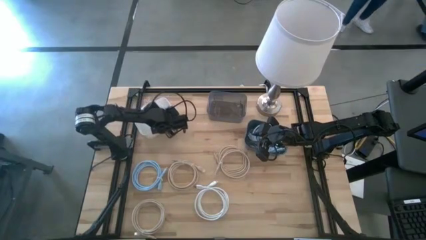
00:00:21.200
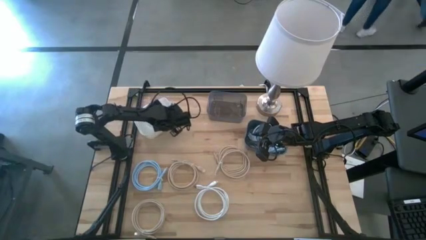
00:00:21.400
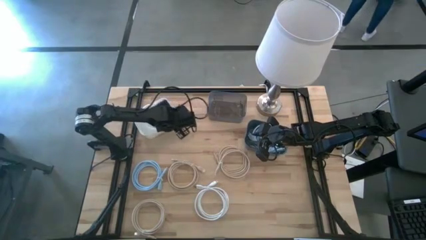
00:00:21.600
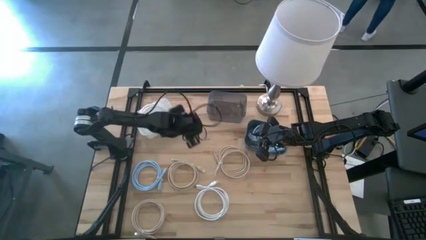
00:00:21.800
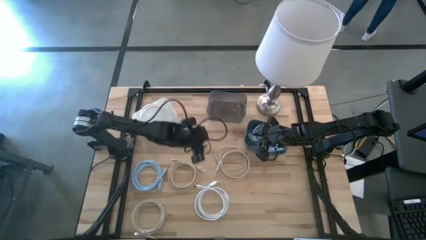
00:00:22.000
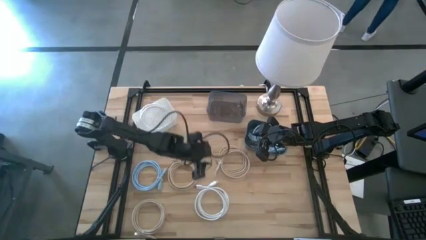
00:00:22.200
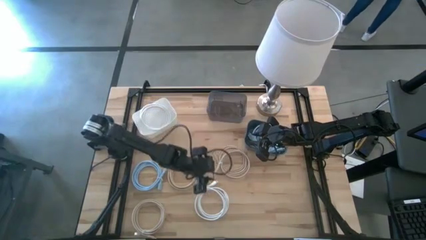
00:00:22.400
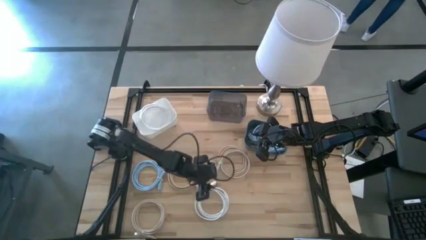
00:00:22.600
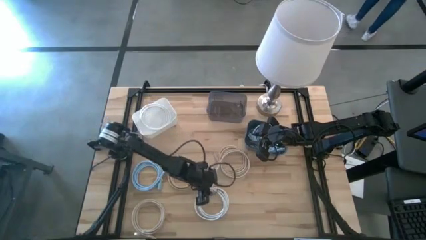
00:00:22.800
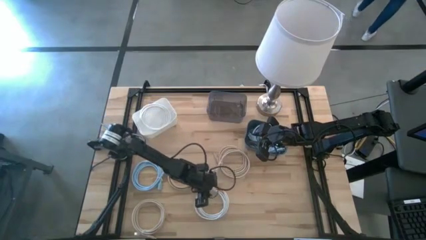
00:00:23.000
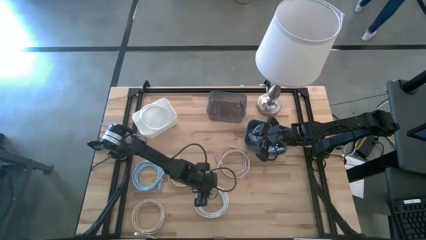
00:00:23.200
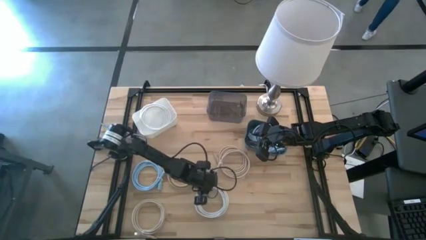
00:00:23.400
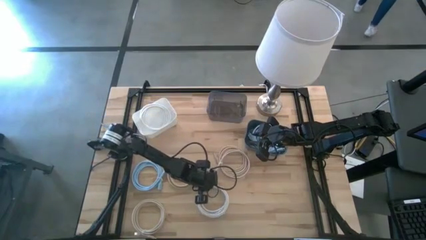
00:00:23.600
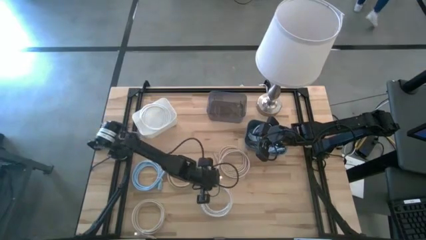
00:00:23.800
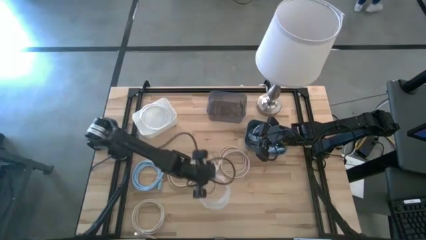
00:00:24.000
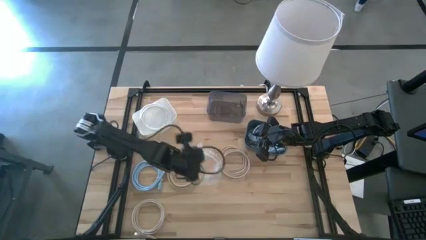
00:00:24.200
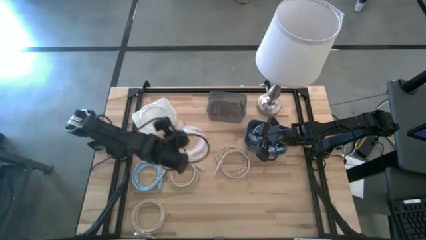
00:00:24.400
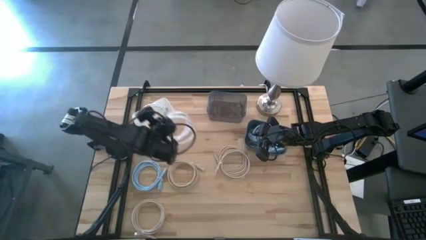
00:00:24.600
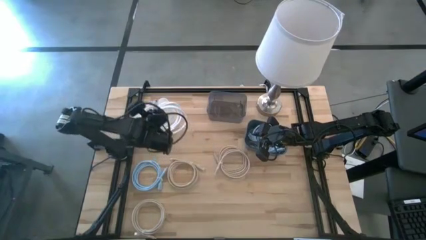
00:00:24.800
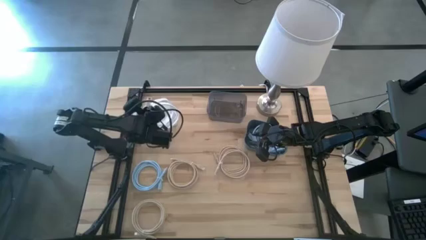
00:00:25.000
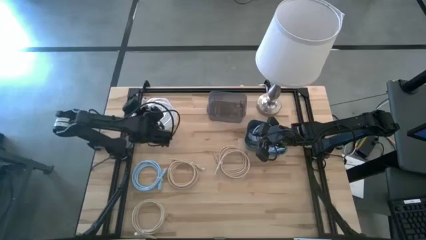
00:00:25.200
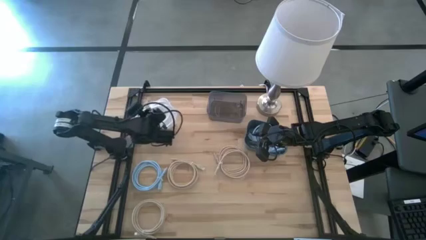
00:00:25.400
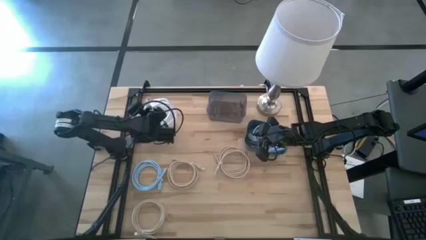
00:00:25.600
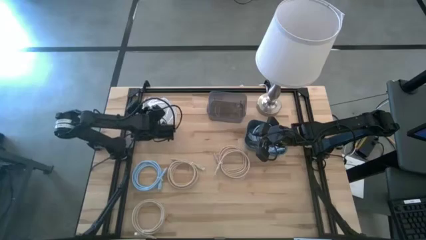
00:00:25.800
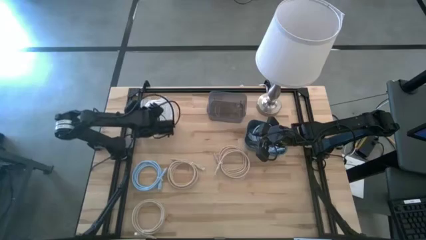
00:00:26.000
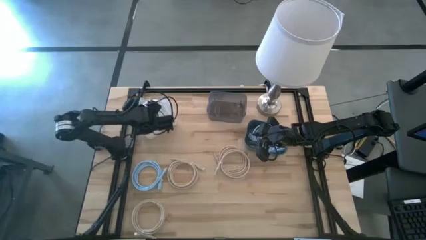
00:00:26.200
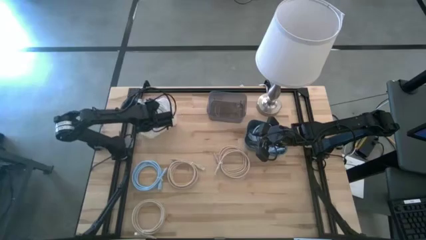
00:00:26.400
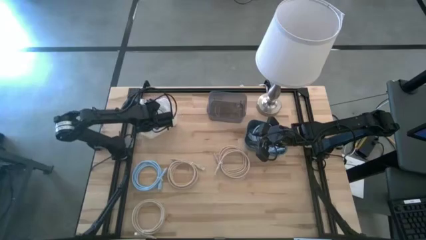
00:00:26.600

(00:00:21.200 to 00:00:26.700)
Task: Pick & Place USB Port
Put the white charger cable into the white bin

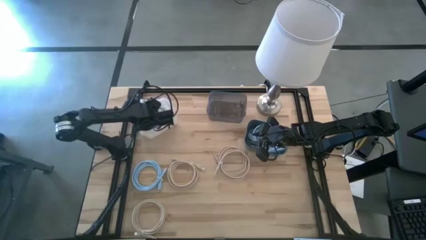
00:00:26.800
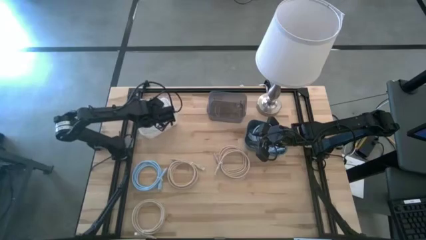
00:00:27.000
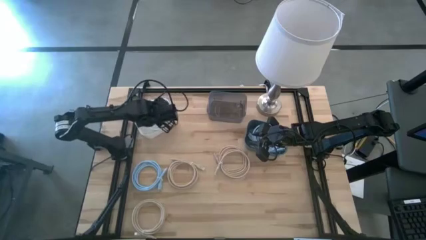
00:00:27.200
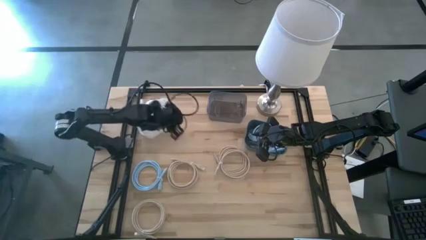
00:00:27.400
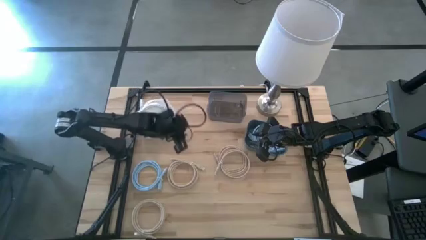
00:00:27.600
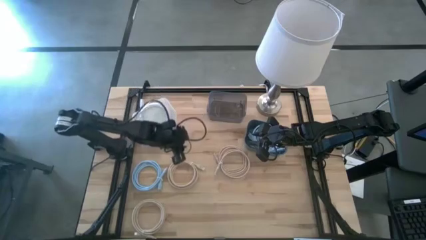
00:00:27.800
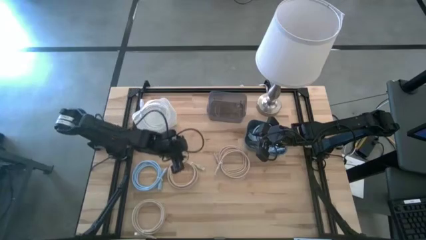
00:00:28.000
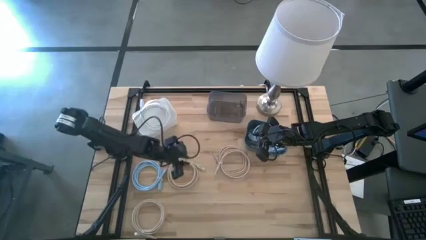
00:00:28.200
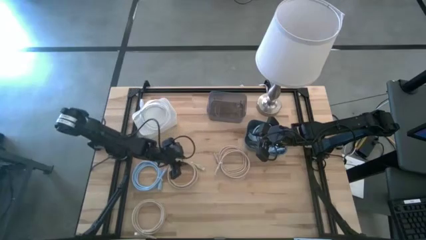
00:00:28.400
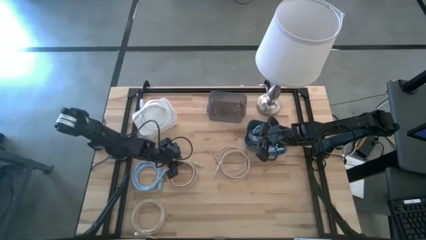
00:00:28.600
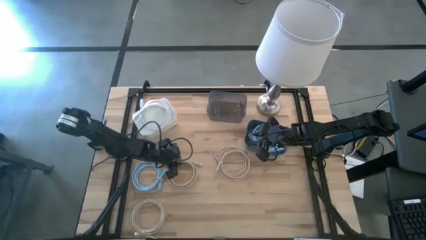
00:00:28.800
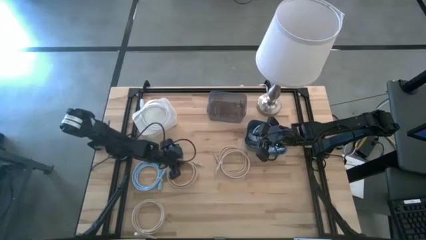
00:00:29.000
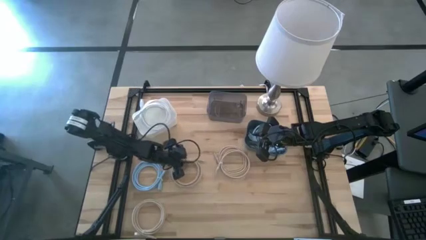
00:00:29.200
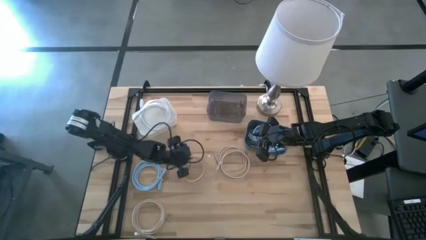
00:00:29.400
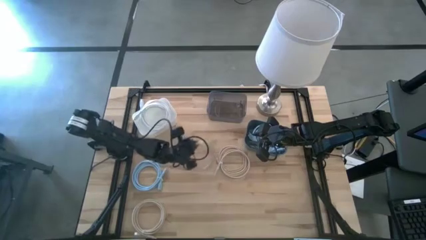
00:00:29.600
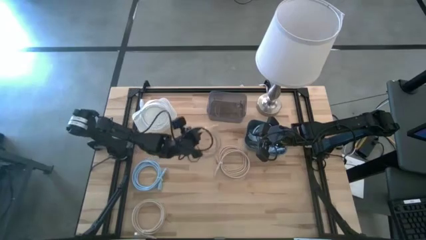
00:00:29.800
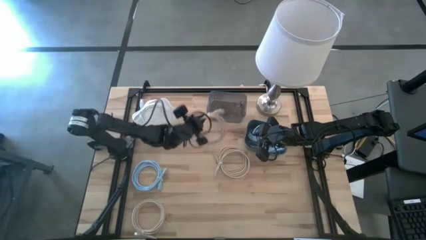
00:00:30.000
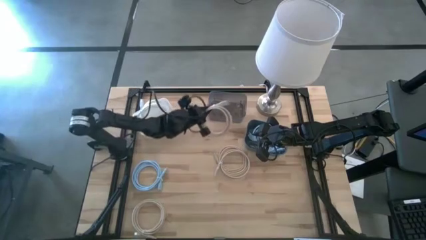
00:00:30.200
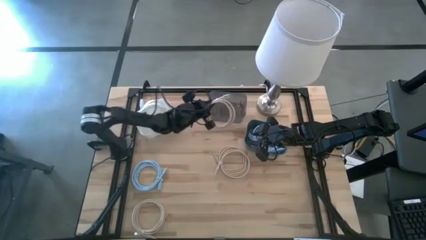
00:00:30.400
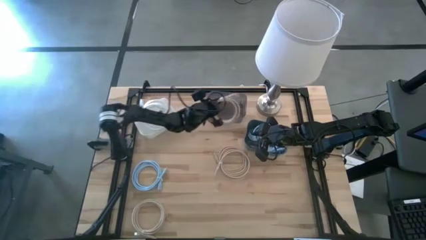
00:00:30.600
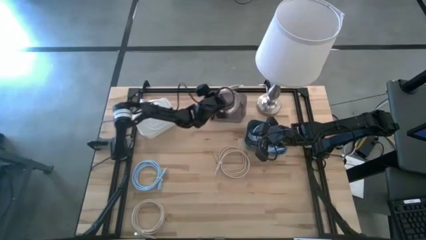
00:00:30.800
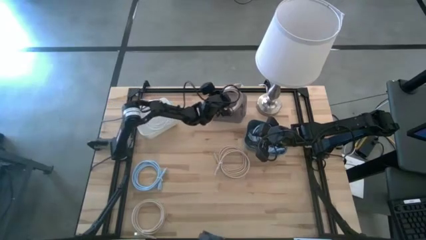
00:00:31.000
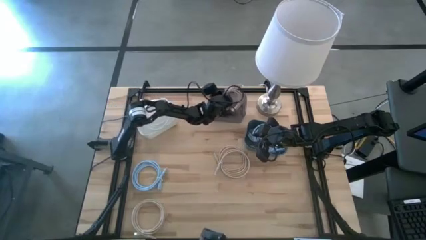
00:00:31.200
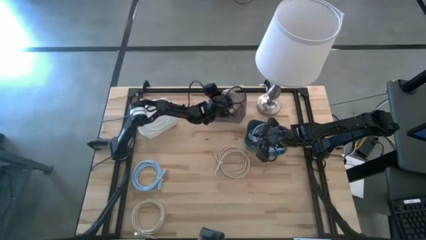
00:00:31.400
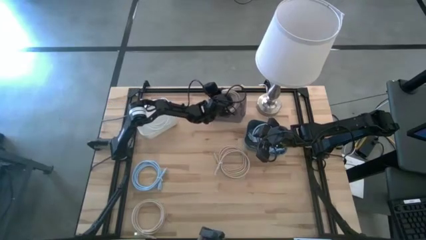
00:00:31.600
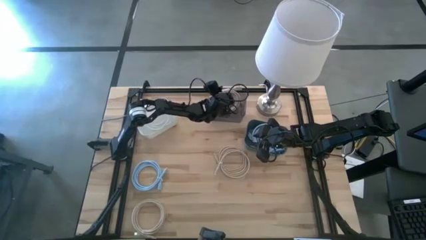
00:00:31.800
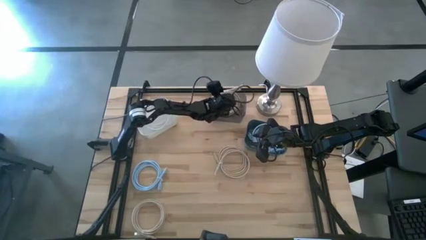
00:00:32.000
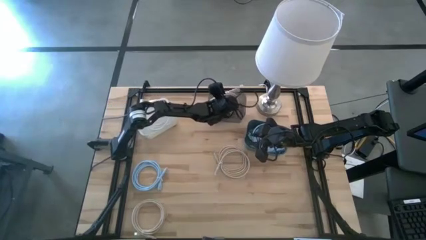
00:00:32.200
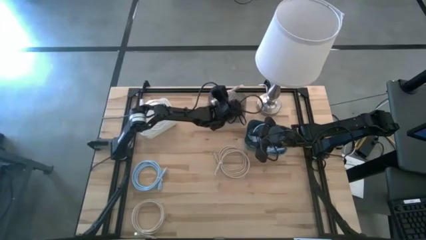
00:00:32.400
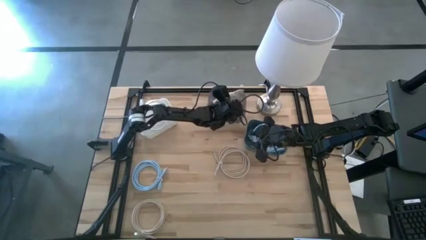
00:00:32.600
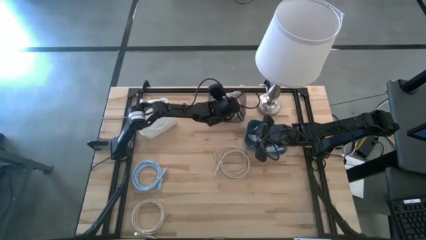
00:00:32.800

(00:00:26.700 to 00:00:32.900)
Put the top left brown charger cable into the black bin

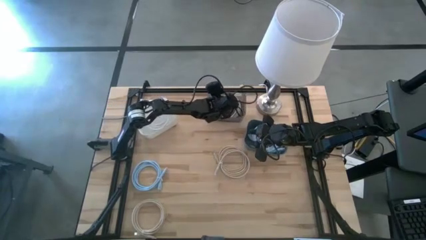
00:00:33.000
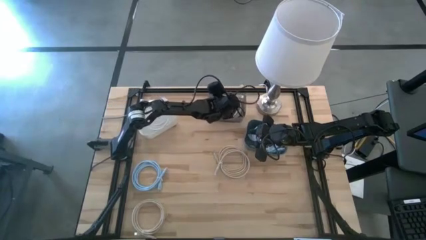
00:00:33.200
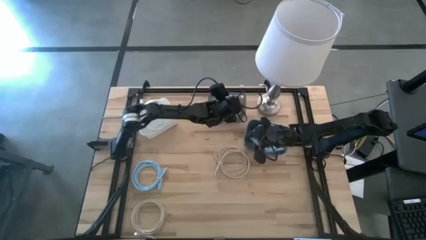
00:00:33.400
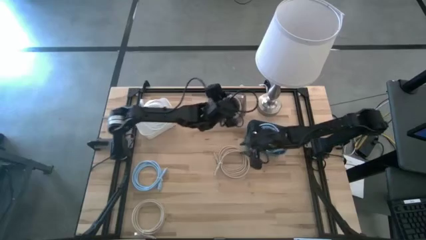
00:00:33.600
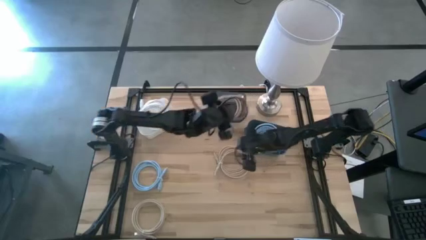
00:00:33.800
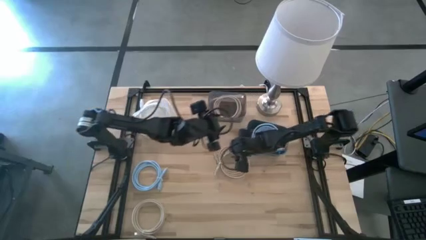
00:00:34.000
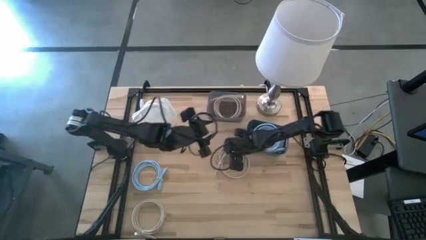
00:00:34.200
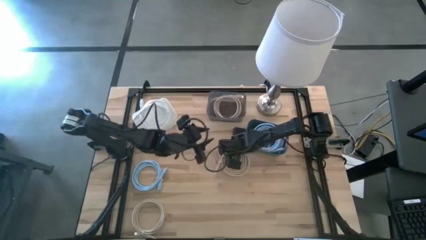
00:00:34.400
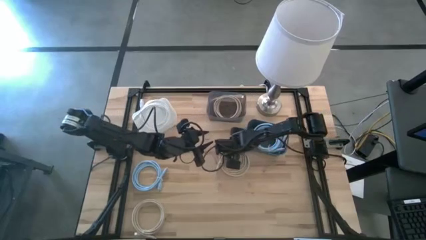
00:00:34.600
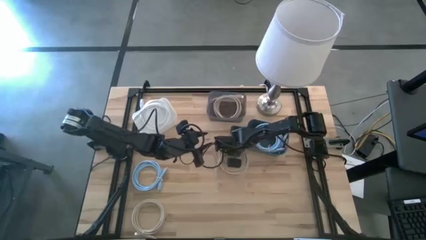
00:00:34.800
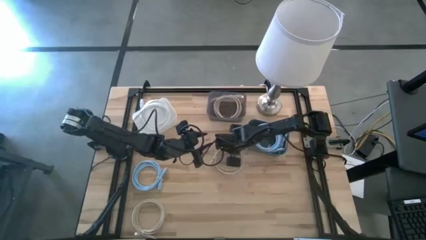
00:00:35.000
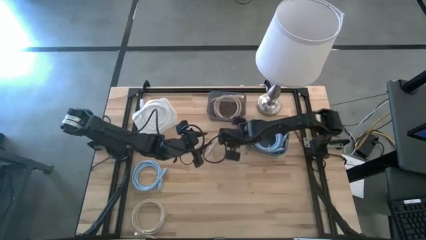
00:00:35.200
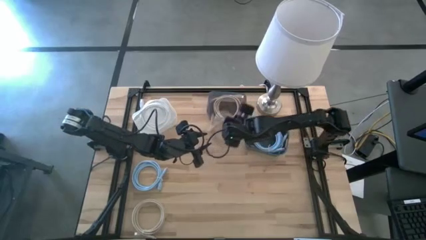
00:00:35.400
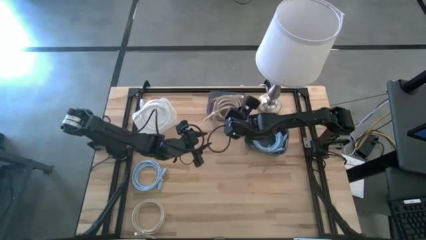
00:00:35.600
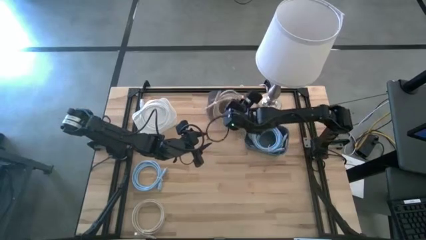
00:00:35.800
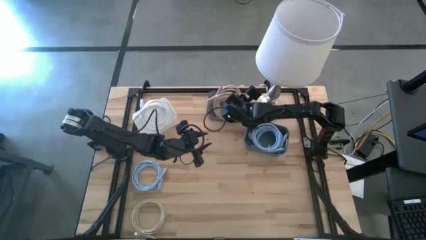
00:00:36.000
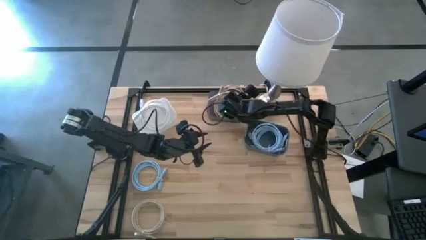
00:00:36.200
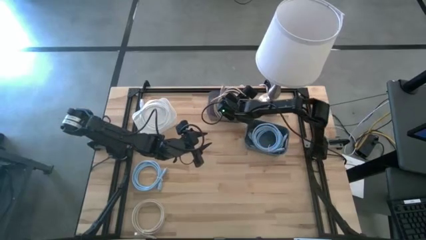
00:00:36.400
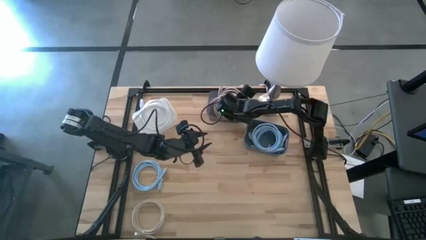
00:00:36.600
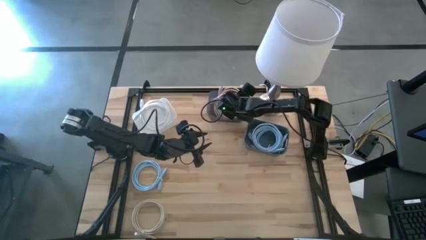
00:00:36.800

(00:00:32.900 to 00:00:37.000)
Put the top brown charger cable into the black bin

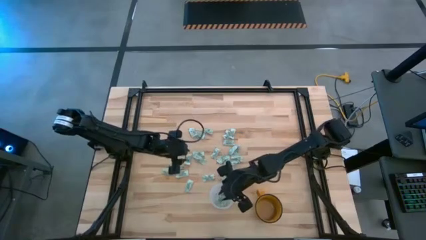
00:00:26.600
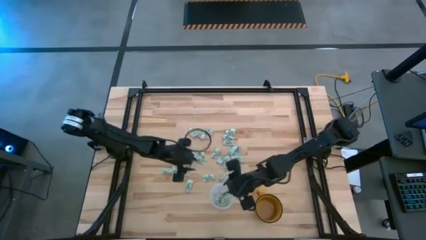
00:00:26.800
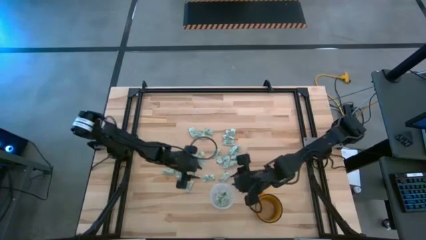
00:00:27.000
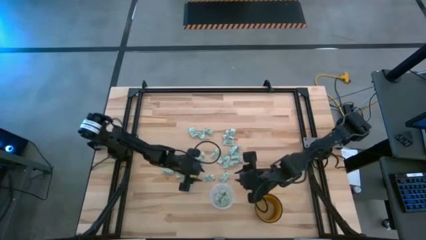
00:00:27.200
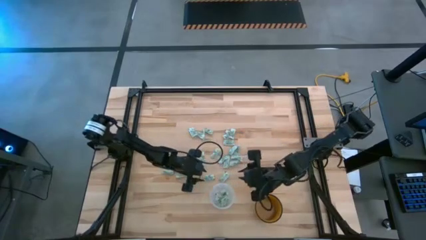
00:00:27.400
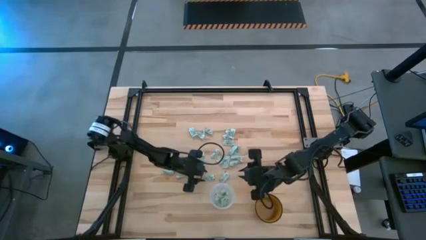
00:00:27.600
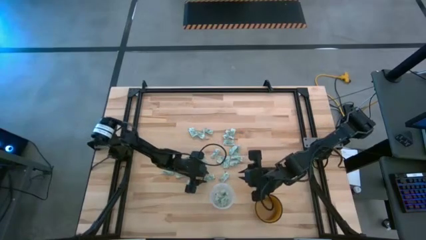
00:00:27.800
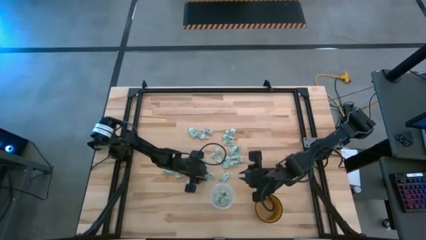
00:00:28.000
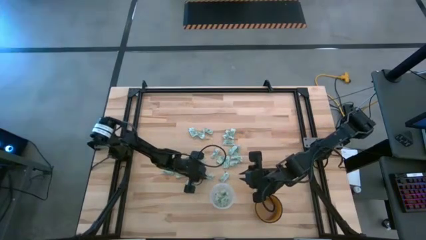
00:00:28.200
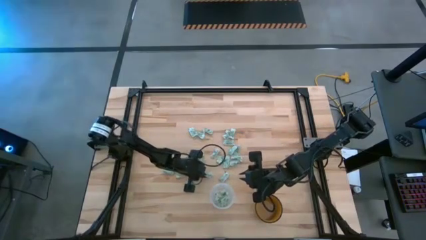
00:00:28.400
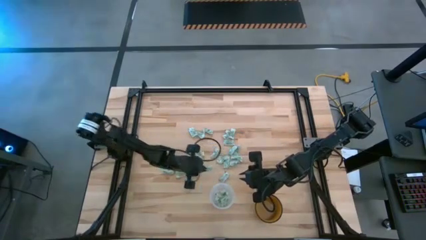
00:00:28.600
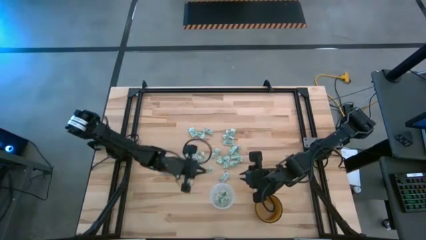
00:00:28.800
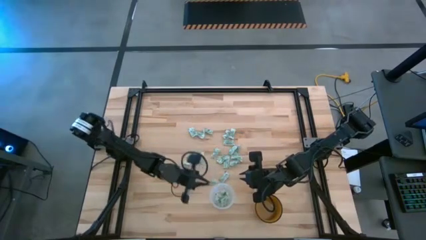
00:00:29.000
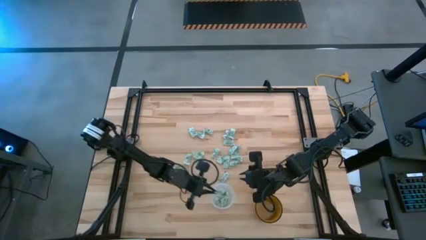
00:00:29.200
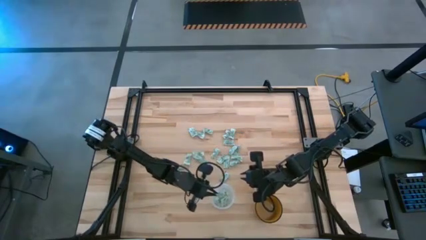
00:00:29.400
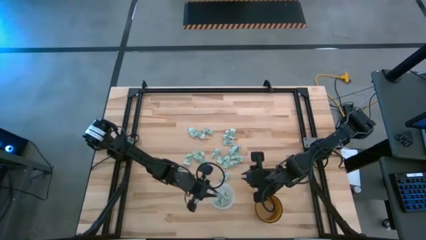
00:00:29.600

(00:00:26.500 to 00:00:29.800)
Task: Pick and place Stevia / Truvia into bins
Put the stevia packet into the transparent bin
